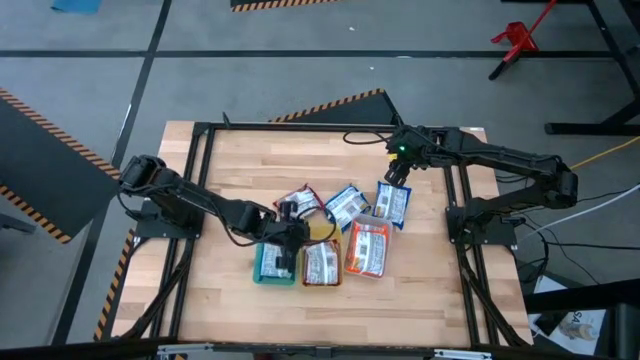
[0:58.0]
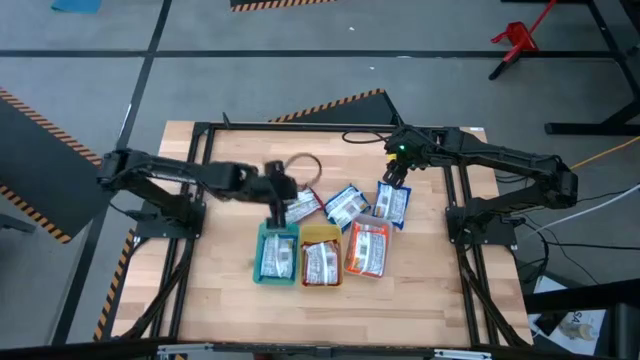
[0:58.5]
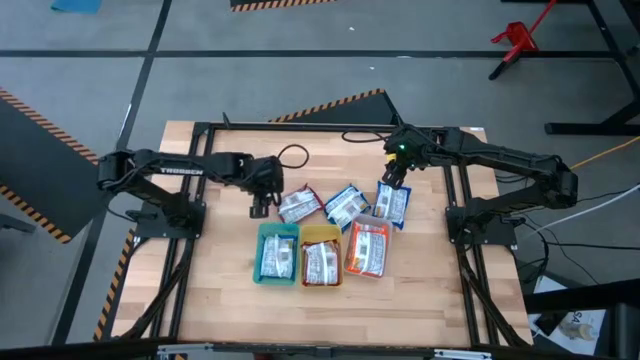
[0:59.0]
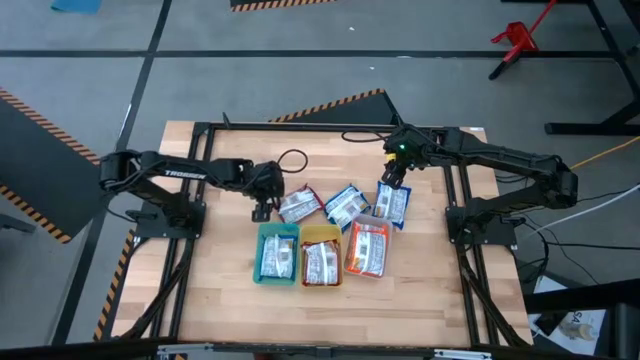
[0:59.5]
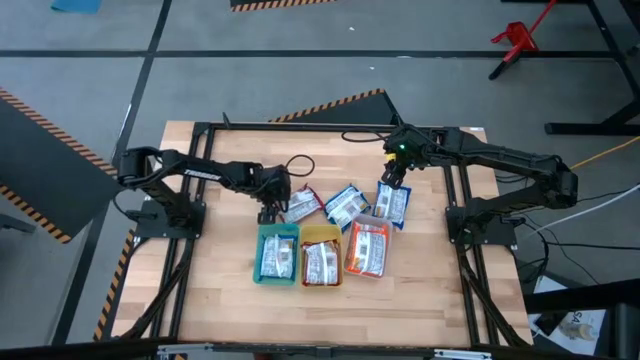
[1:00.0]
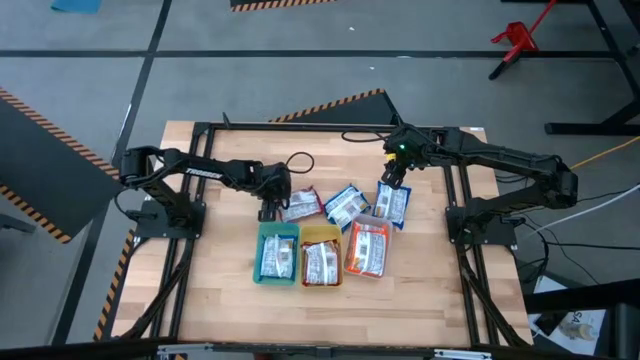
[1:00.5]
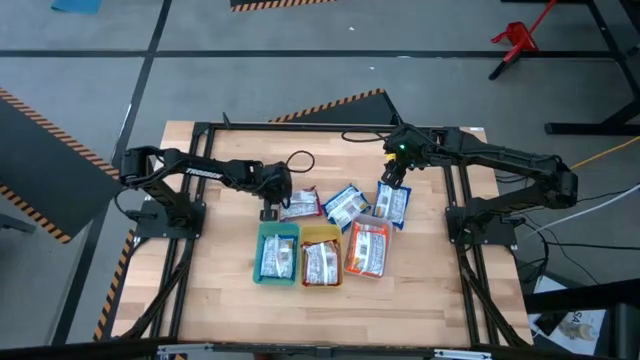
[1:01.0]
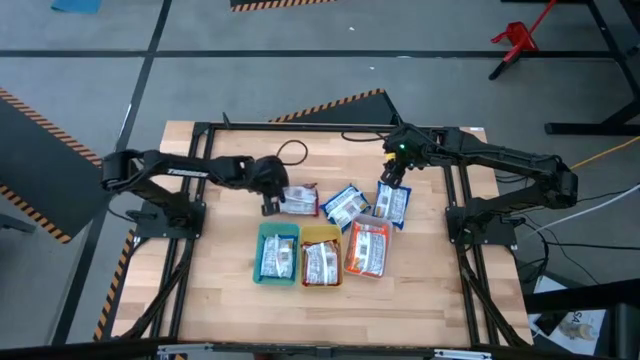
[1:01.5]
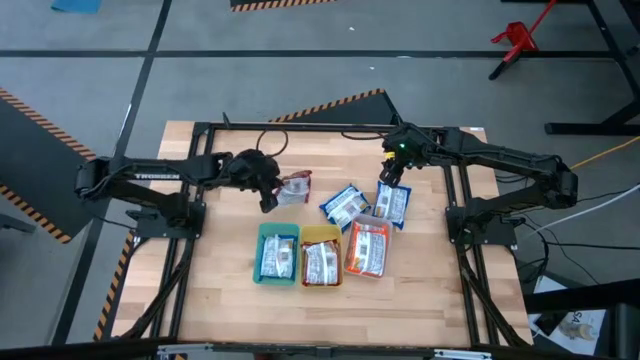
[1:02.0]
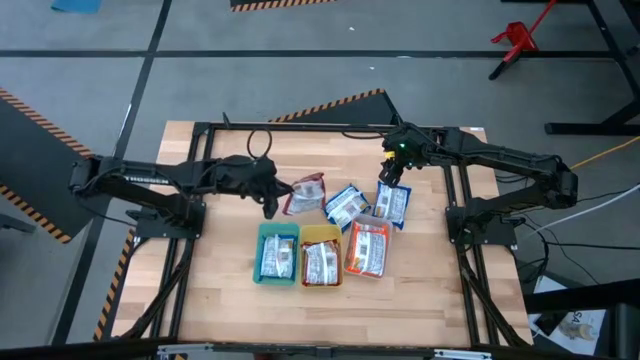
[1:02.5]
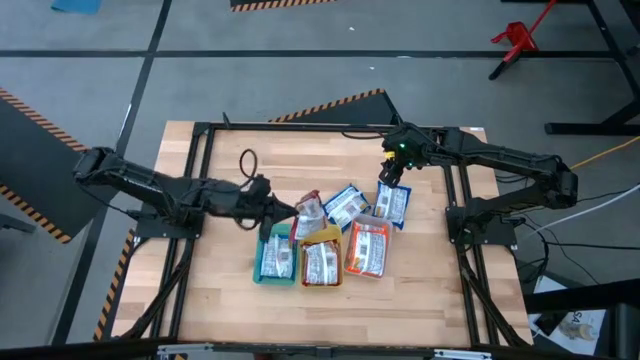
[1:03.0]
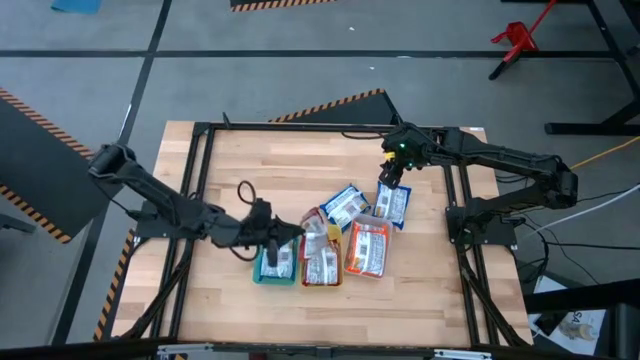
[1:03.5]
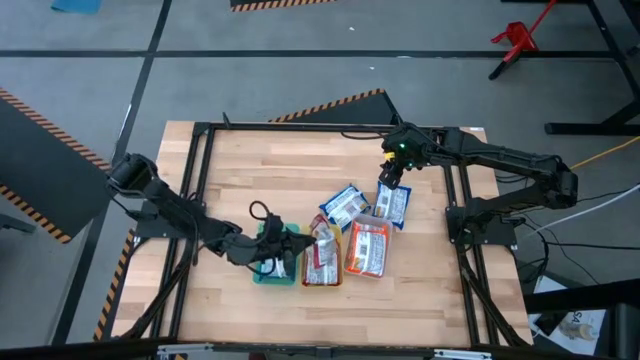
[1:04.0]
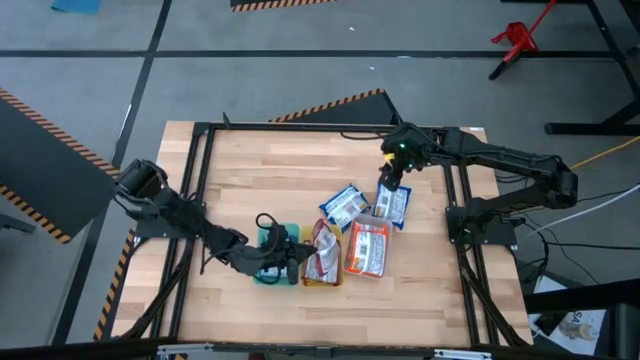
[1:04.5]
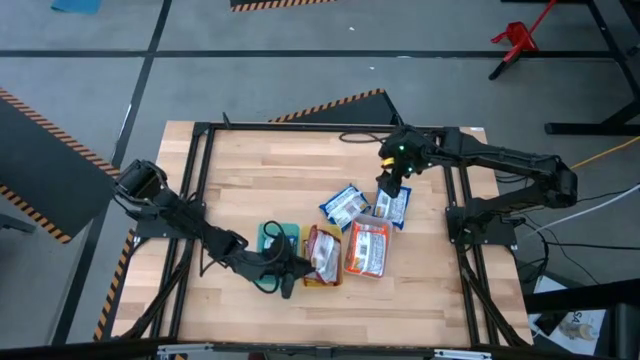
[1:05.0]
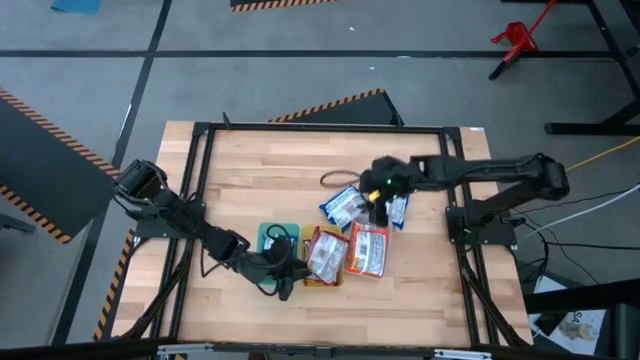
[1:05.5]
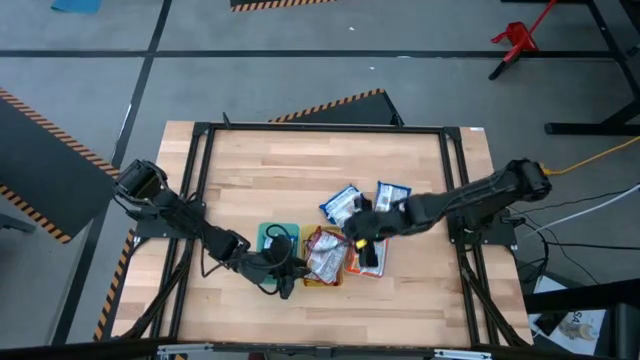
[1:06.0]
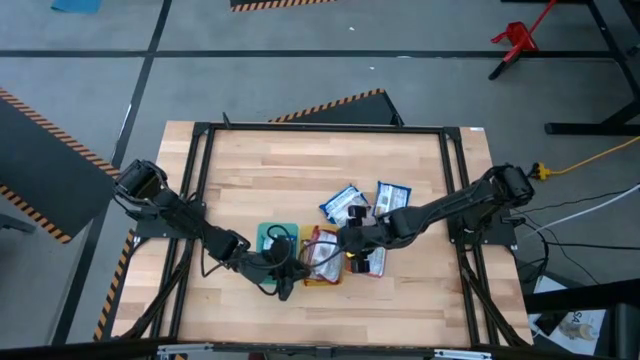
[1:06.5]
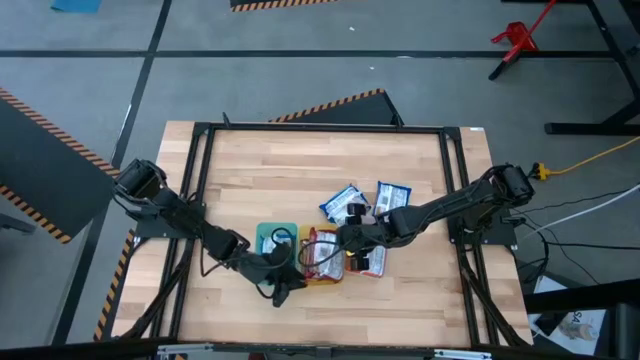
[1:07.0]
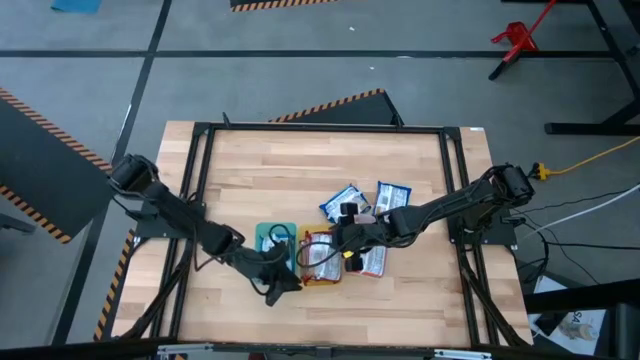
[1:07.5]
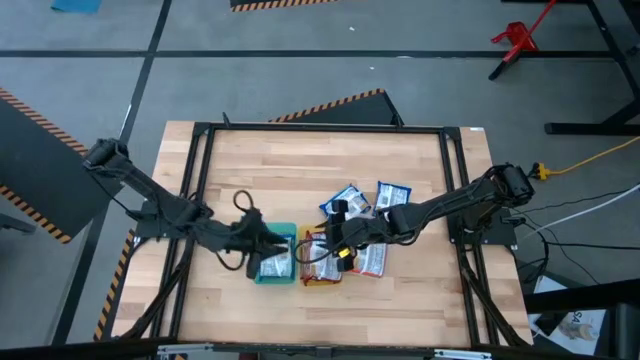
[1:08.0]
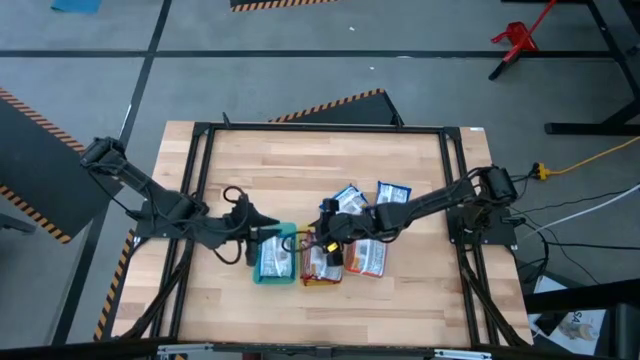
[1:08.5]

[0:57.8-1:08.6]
Task: Sort Maruchan noodles
Put the red noodle pack into the yellow bin

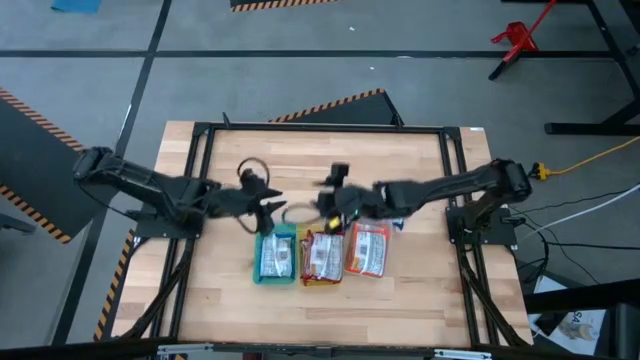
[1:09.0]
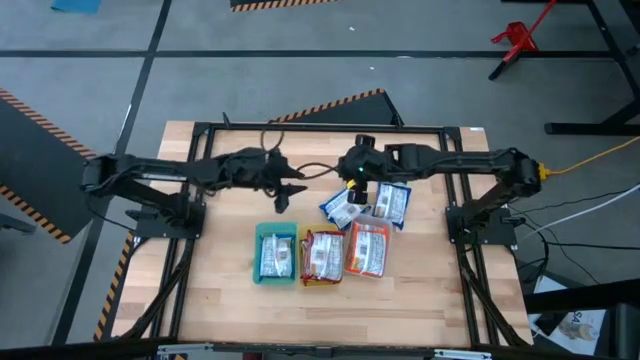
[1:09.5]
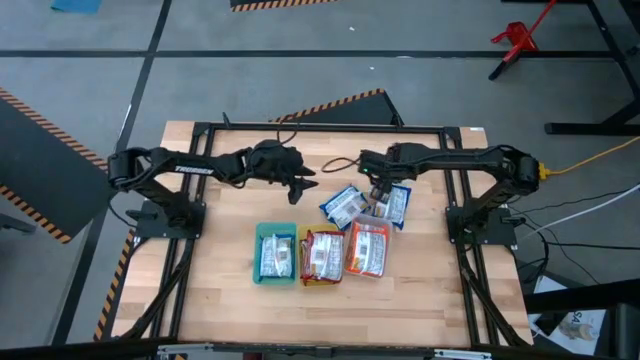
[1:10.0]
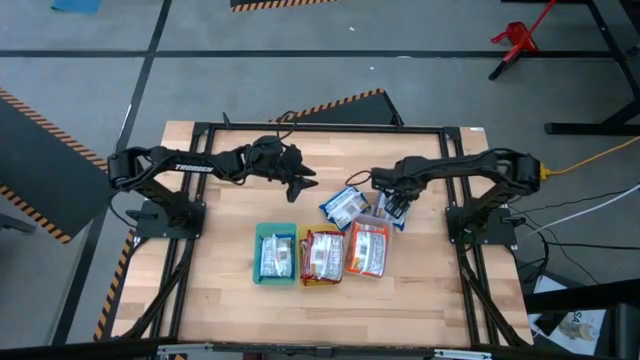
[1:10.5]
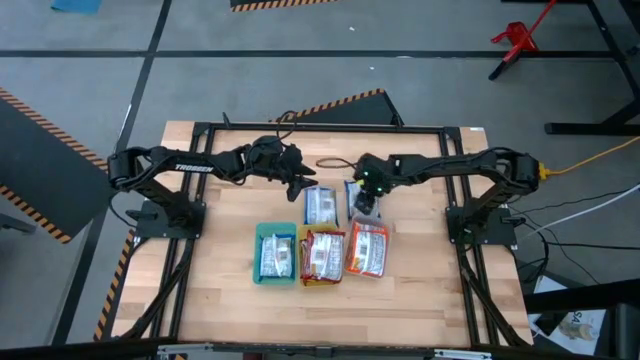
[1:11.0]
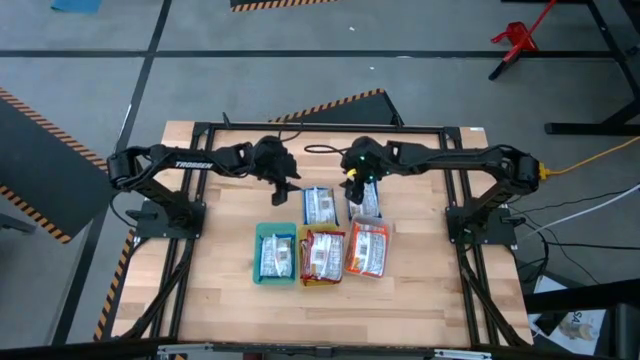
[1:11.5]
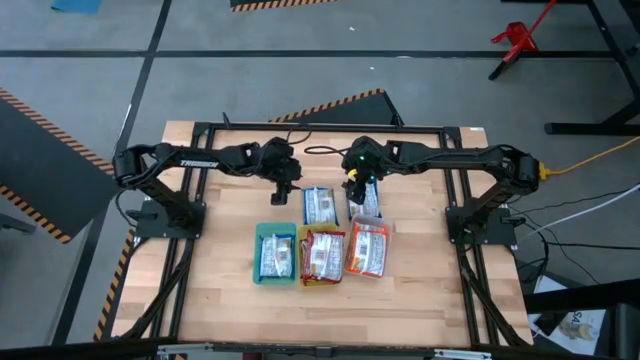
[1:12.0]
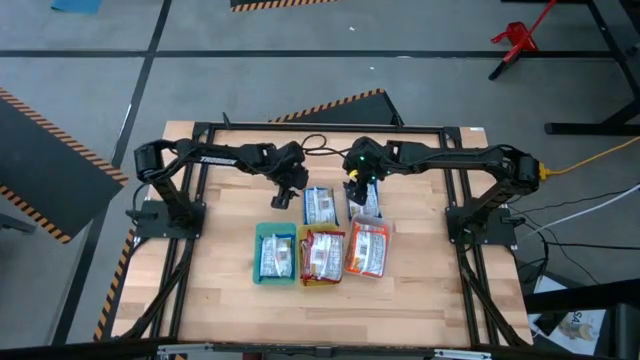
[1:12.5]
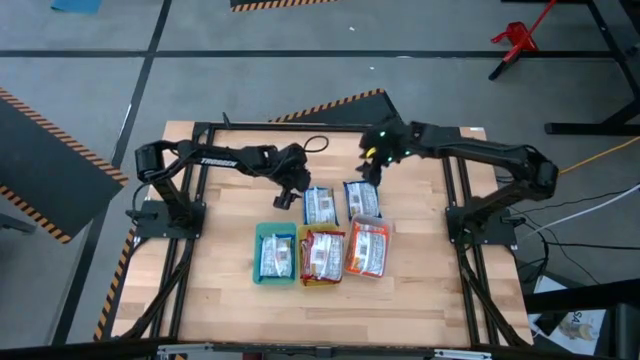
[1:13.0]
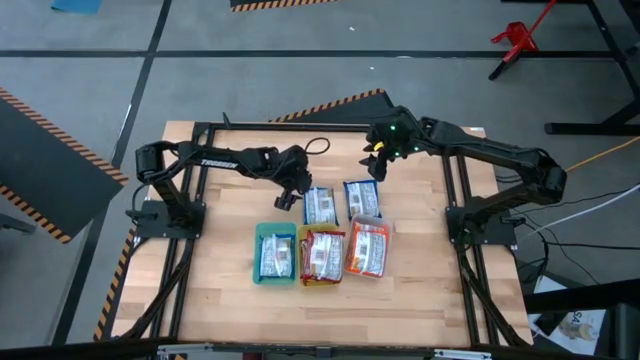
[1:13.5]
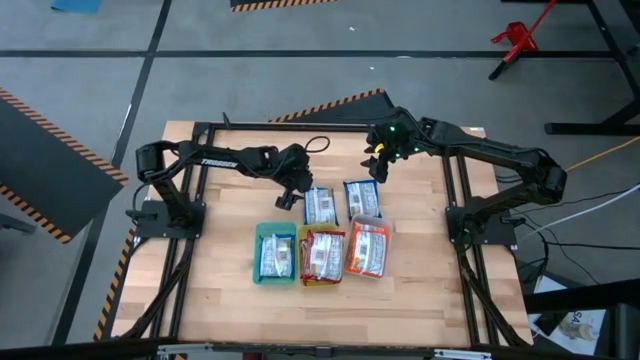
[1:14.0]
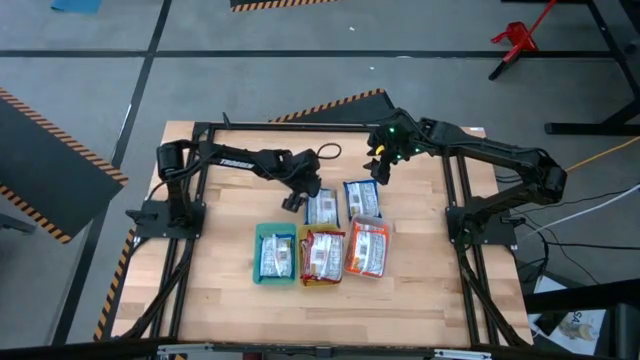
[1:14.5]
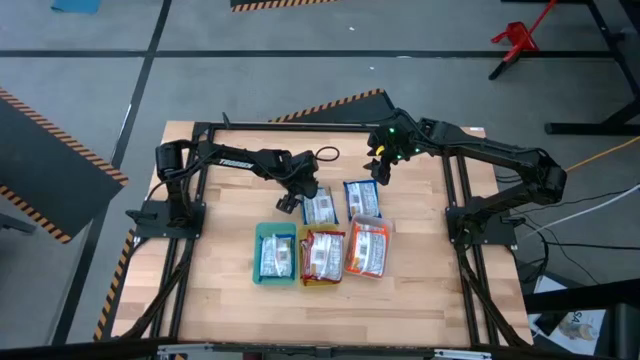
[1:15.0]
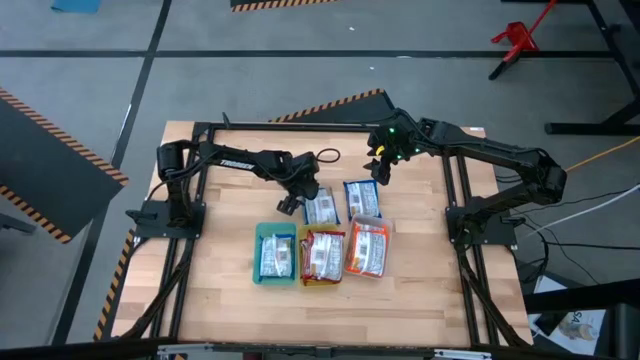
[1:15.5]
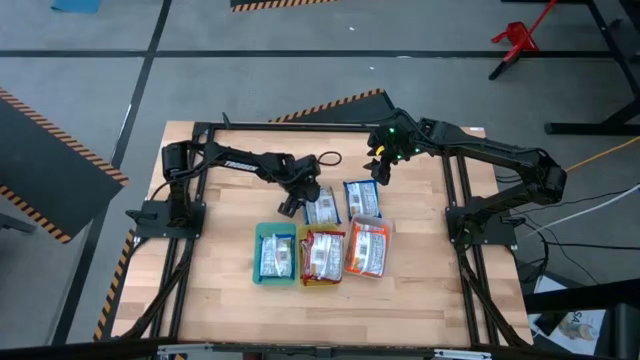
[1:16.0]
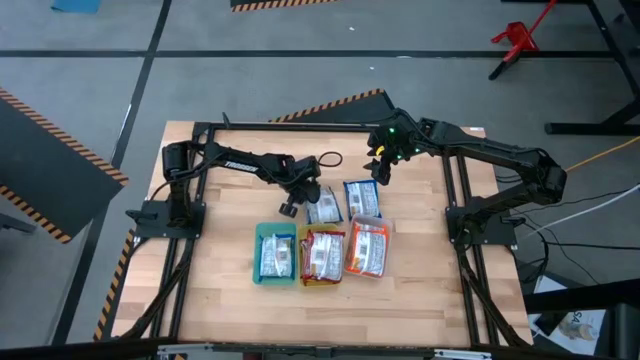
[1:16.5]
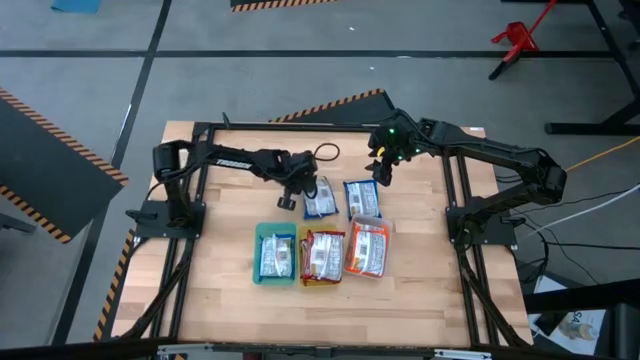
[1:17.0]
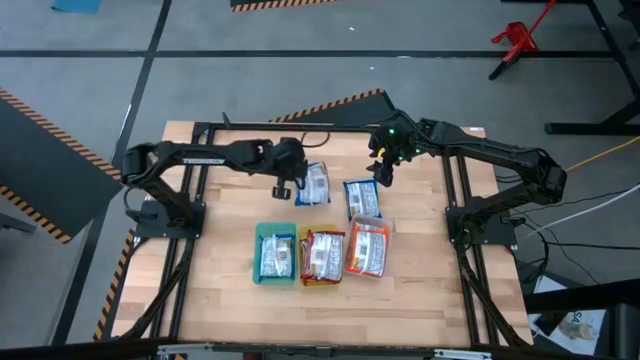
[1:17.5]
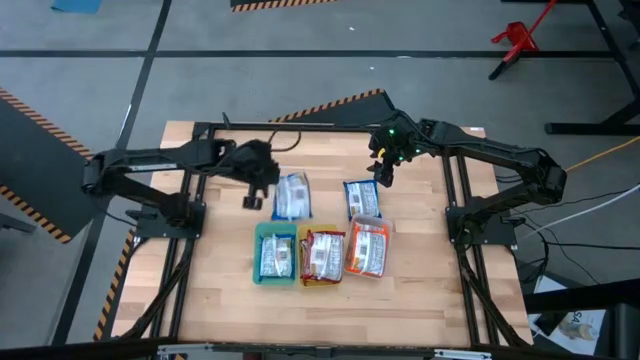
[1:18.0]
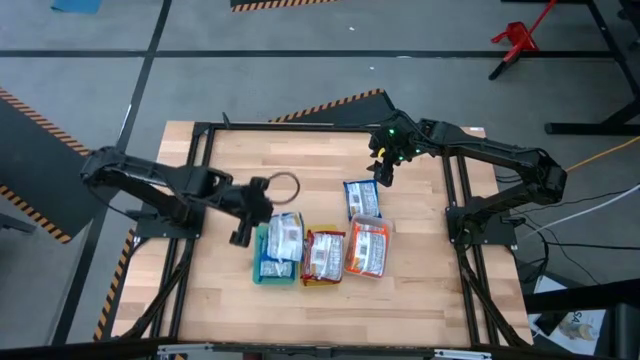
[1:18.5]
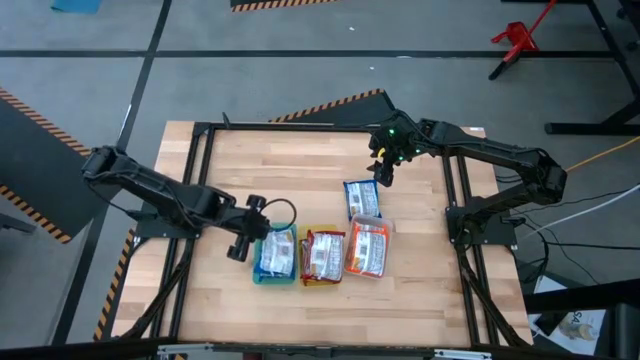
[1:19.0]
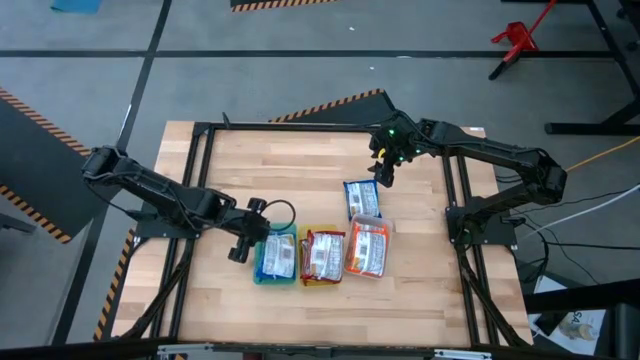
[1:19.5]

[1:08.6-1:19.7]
Put the left blue noodle pack into the green bin
